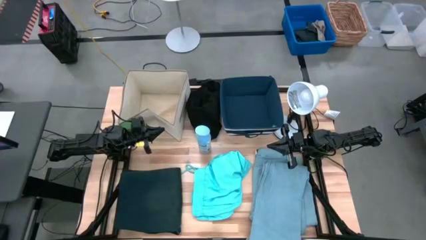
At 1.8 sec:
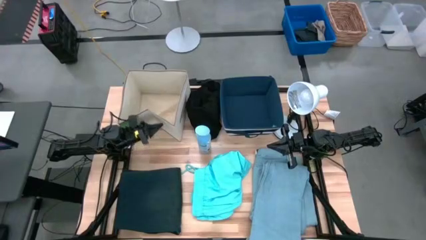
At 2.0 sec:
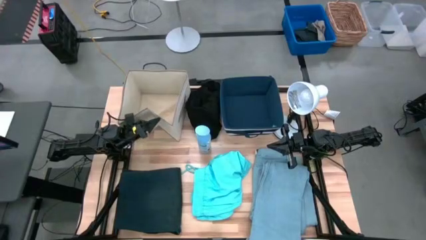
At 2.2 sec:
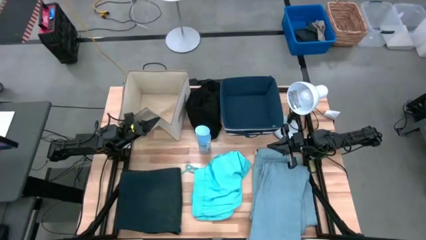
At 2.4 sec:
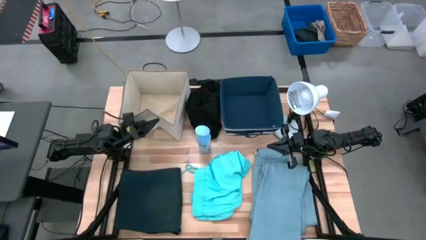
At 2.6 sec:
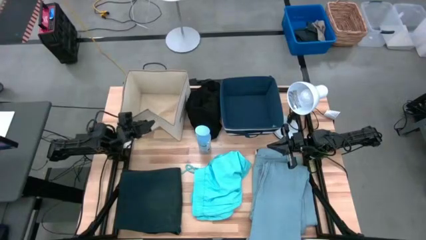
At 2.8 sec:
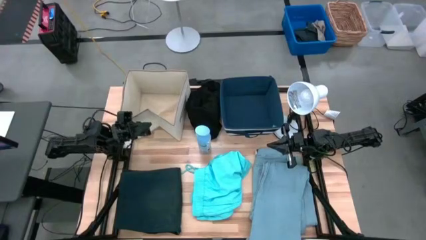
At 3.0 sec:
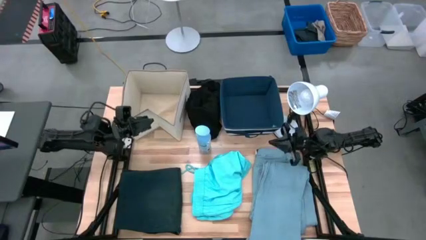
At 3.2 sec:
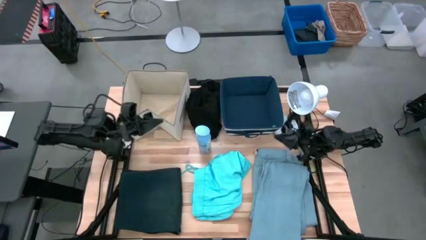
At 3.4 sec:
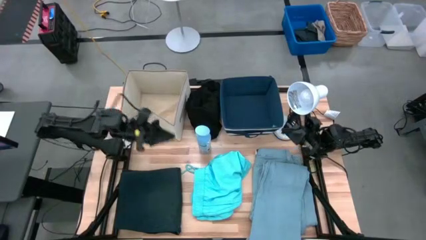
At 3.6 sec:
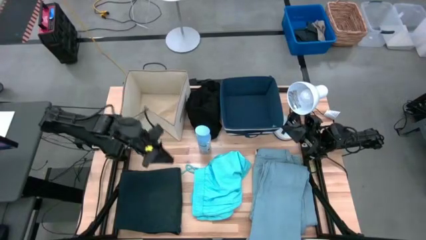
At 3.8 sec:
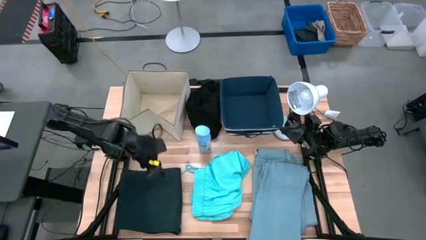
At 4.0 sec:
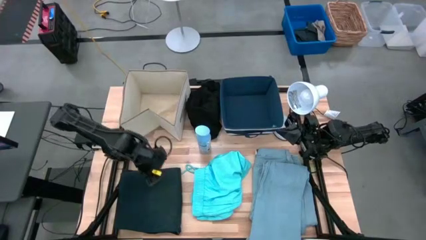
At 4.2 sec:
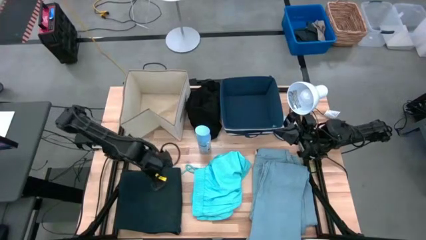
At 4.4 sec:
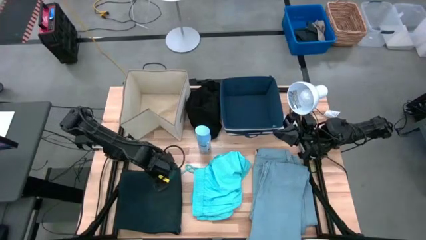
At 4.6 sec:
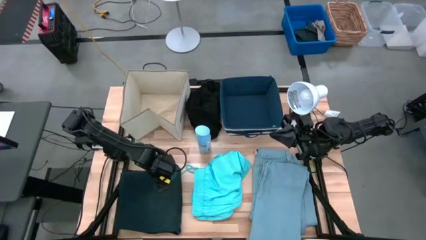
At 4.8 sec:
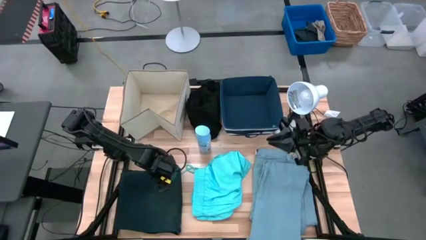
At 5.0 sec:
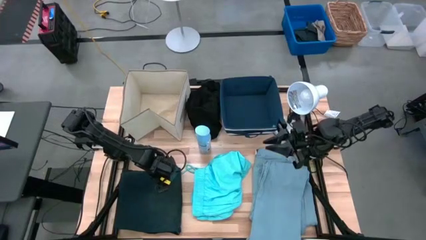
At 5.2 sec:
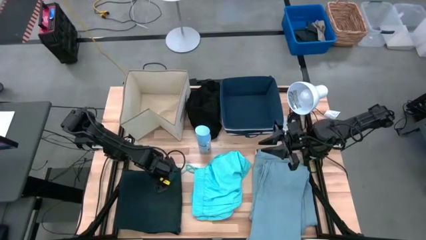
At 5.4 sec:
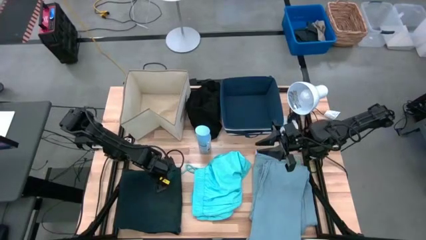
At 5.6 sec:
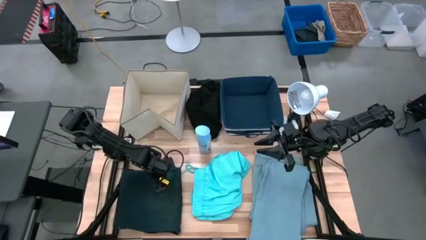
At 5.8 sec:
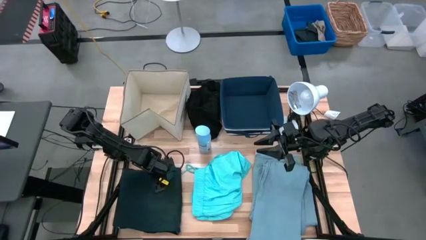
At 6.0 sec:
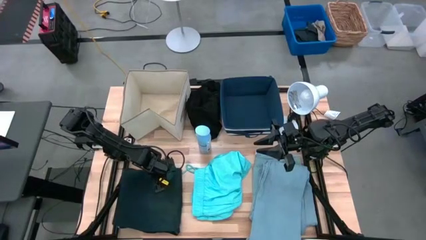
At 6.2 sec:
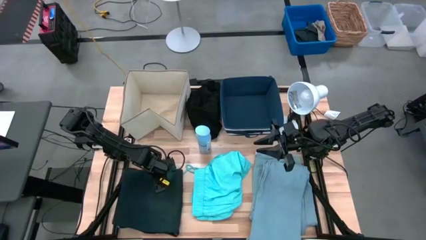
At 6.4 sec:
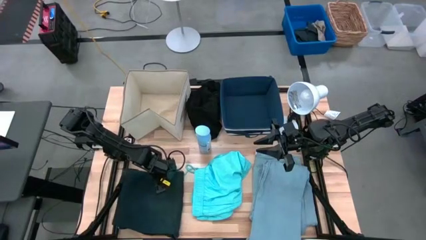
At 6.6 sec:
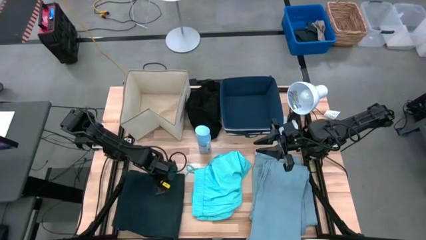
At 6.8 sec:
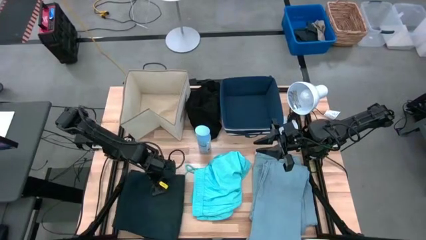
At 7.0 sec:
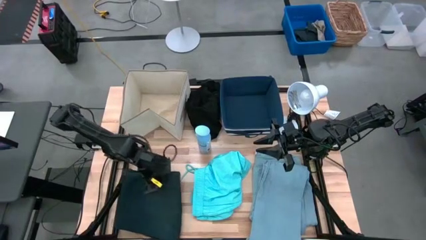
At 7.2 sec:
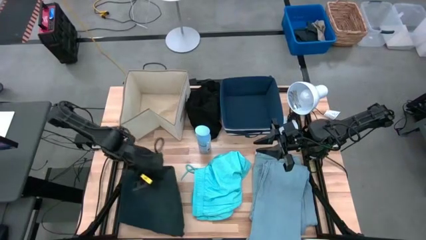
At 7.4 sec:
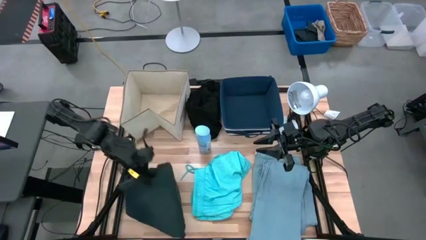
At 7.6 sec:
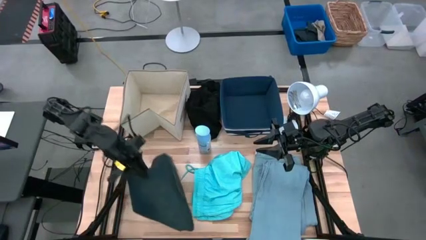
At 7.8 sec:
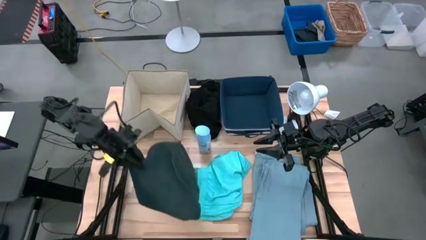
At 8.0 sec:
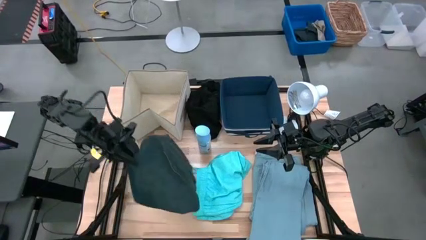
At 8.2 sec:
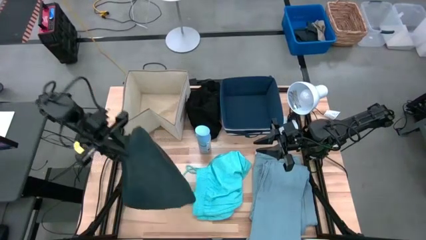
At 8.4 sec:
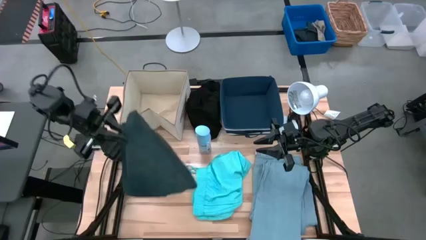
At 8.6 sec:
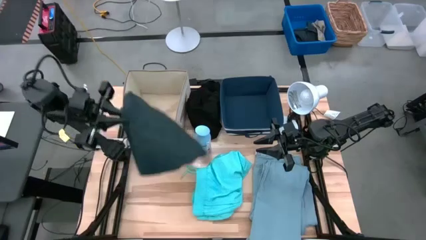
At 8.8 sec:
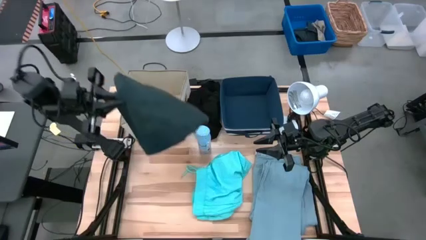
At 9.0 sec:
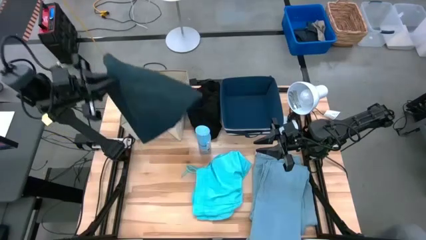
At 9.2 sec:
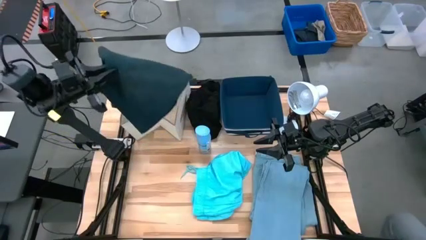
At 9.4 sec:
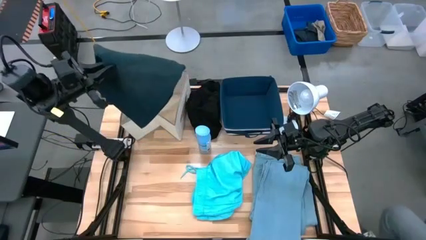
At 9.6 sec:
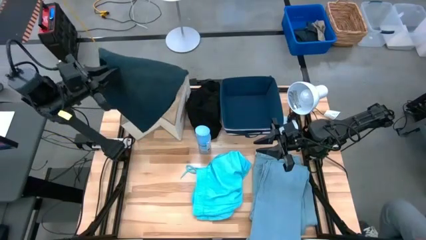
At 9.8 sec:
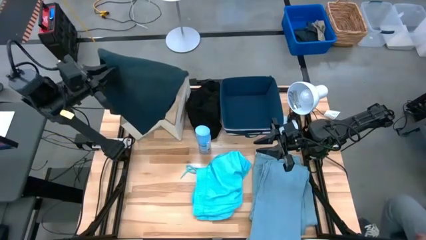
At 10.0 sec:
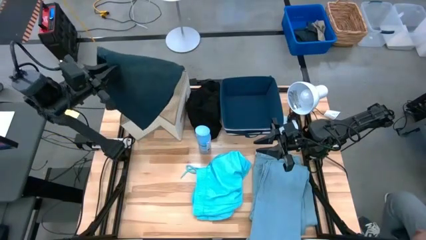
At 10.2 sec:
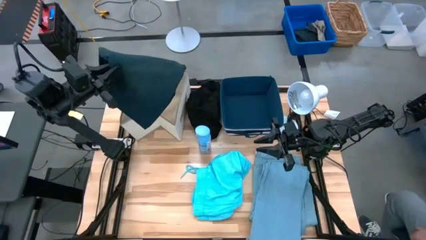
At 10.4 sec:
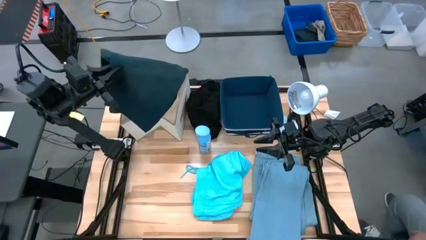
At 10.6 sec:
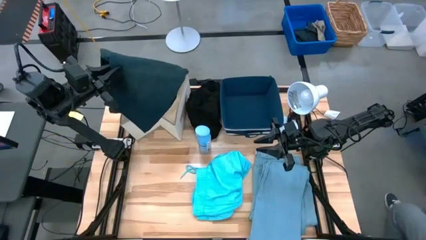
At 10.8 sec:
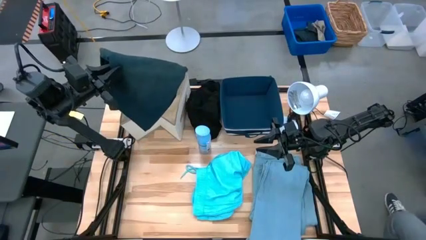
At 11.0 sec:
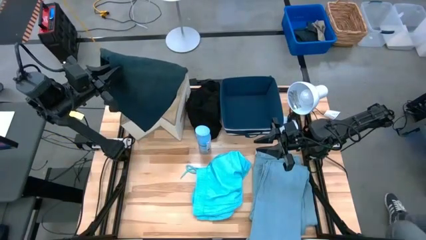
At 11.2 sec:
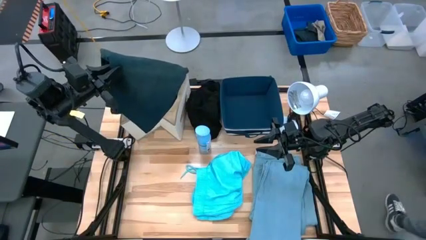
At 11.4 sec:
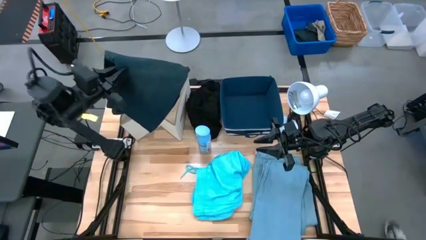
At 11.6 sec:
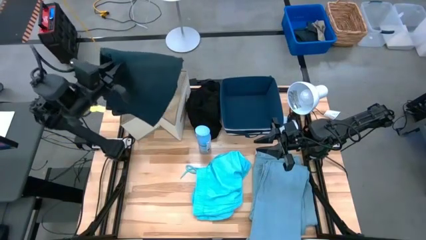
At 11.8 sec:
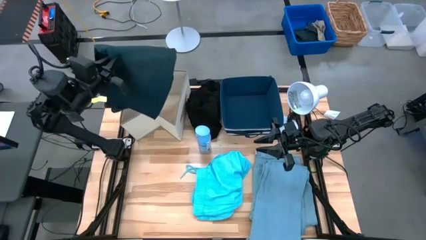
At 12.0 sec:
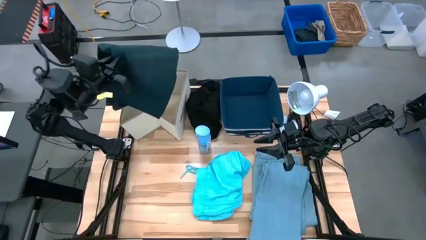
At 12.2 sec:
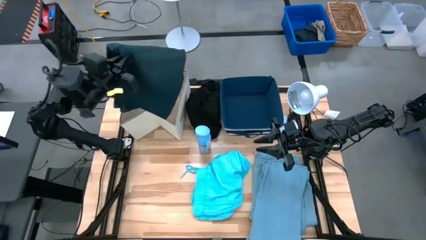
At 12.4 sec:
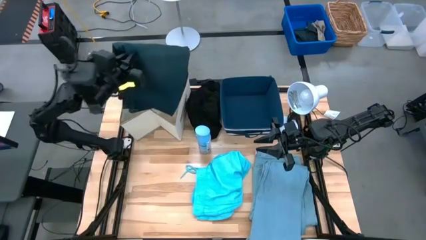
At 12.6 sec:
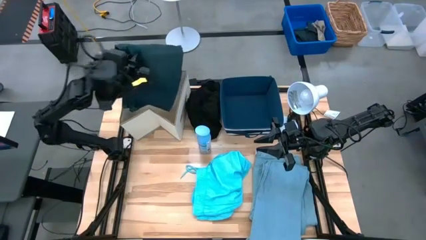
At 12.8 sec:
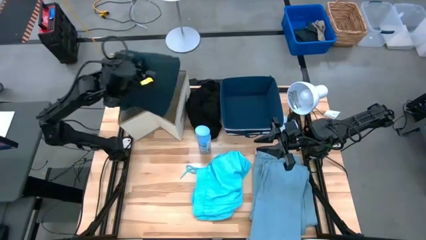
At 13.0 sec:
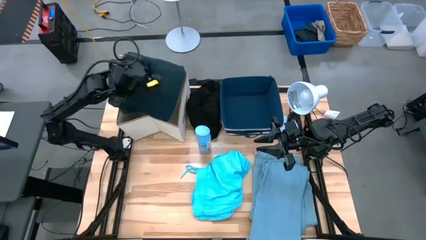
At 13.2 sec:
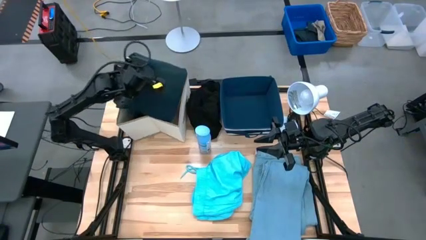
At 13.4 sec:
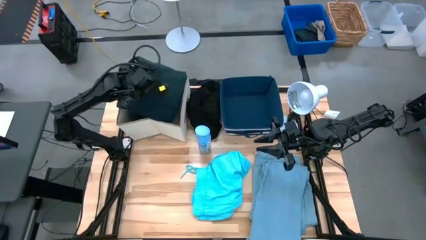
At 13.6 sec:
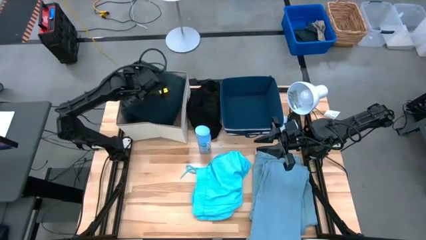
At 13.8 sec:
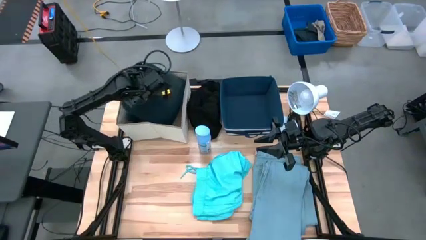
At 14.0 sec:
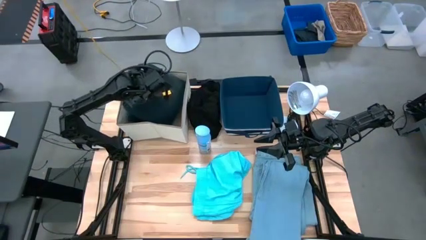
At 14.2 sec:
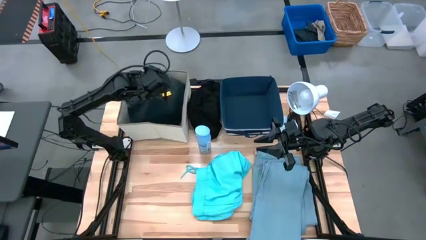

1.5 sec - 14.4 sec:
Task: Sort clothes
Put the black pants into the laundry organizer
